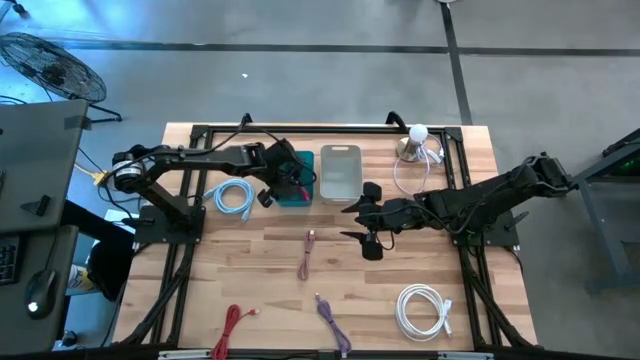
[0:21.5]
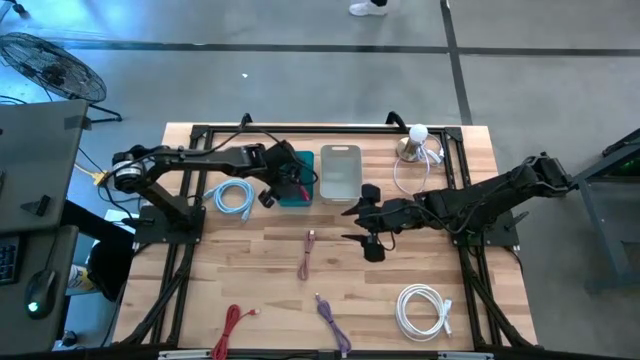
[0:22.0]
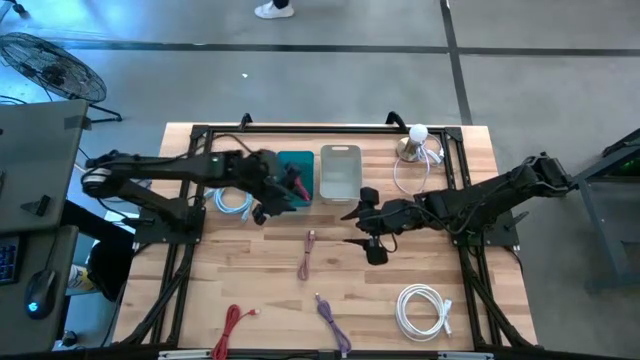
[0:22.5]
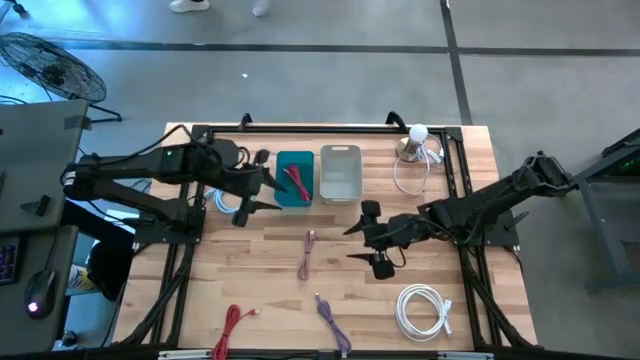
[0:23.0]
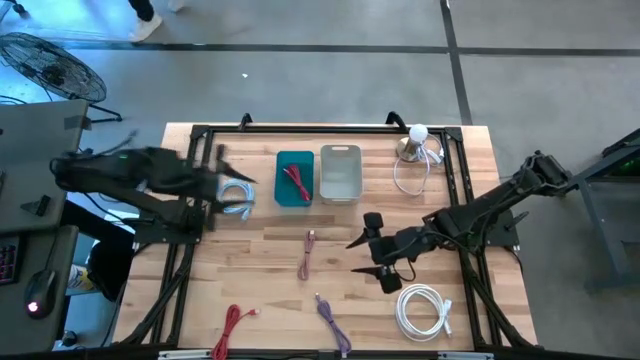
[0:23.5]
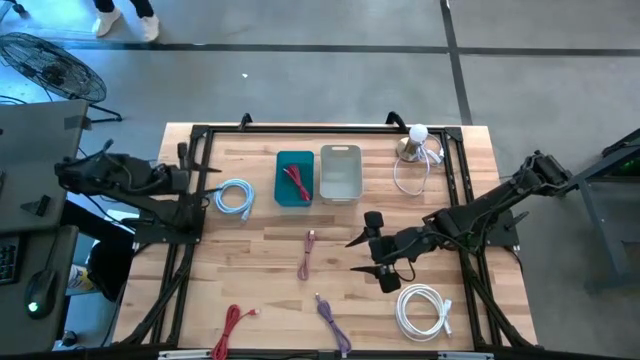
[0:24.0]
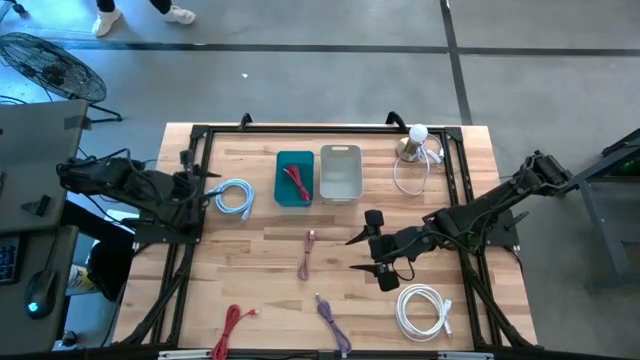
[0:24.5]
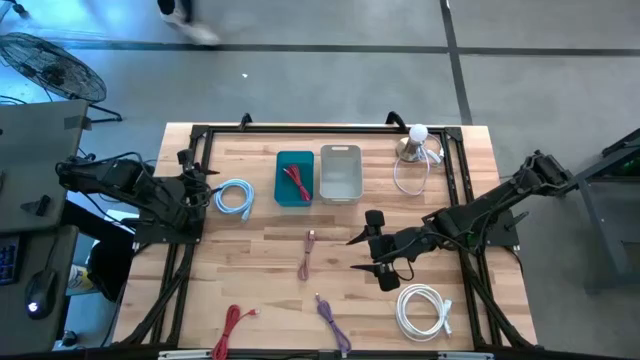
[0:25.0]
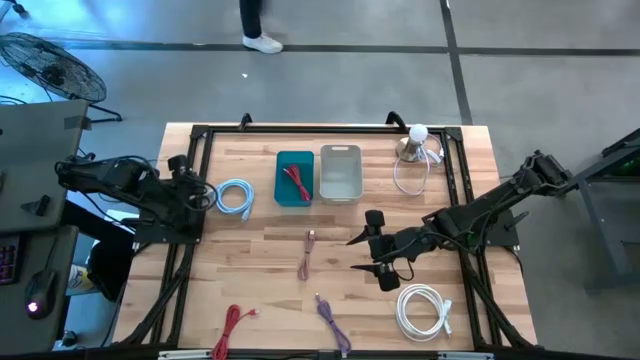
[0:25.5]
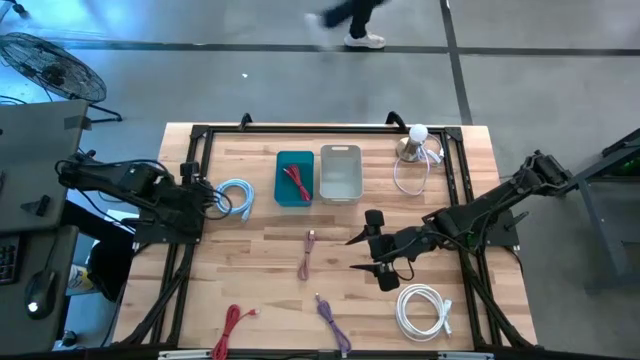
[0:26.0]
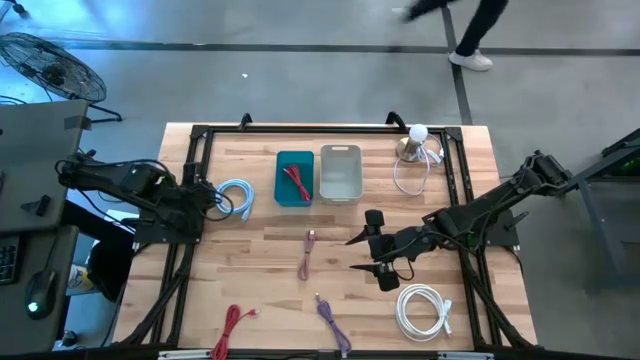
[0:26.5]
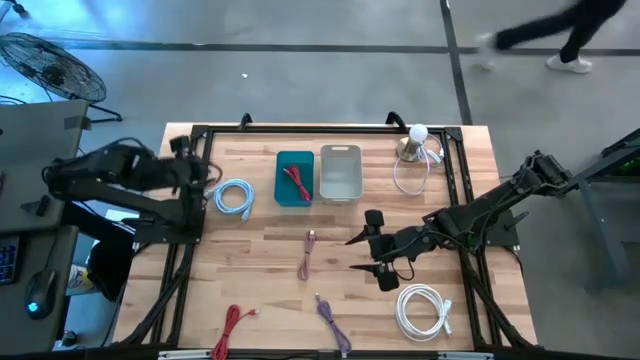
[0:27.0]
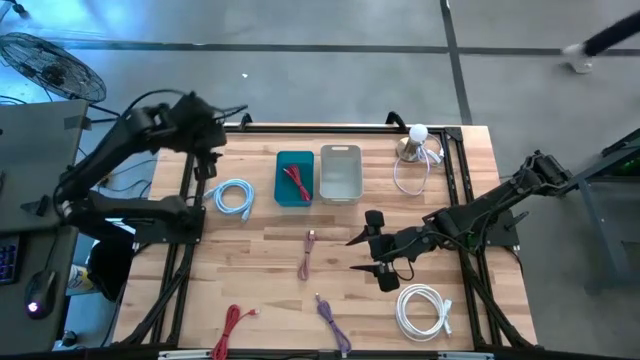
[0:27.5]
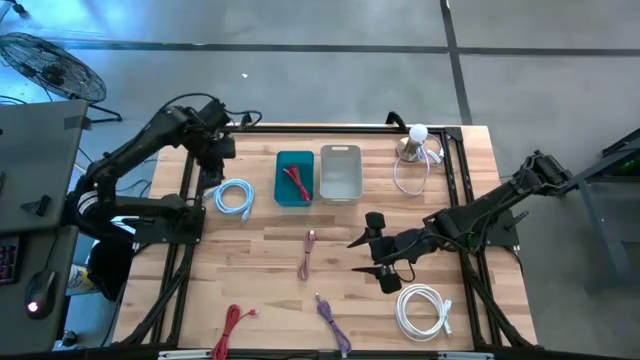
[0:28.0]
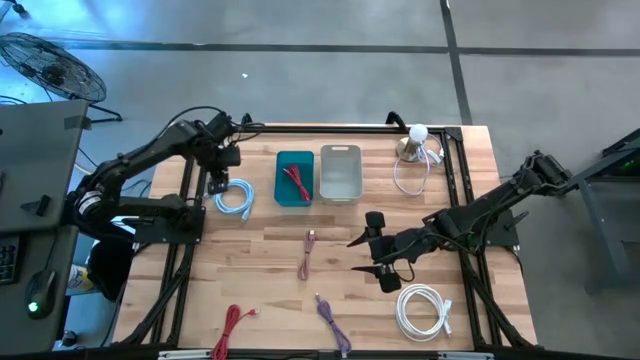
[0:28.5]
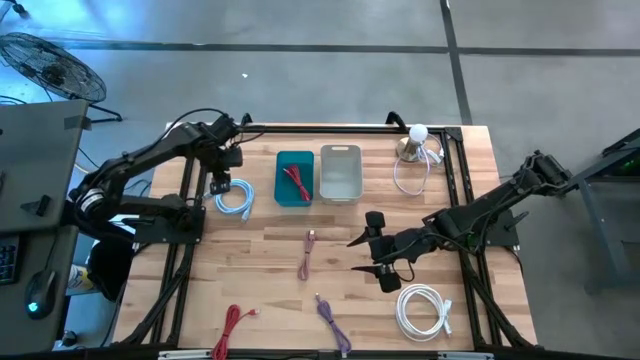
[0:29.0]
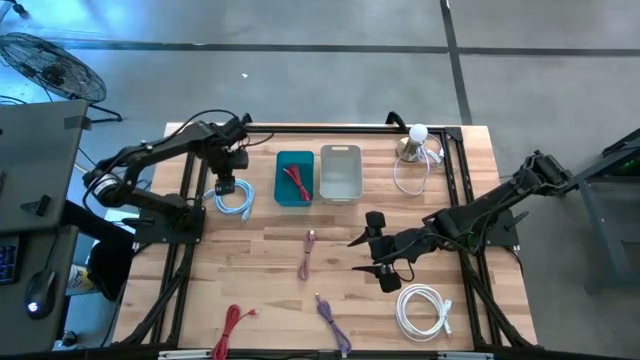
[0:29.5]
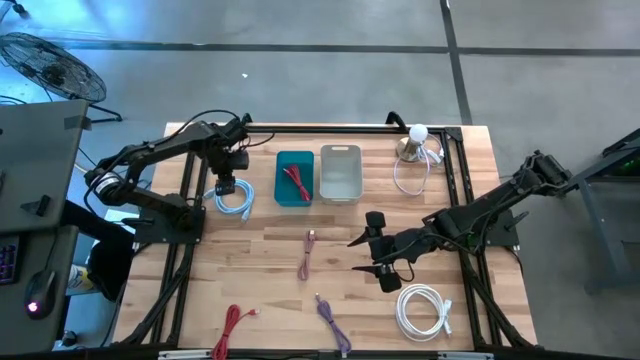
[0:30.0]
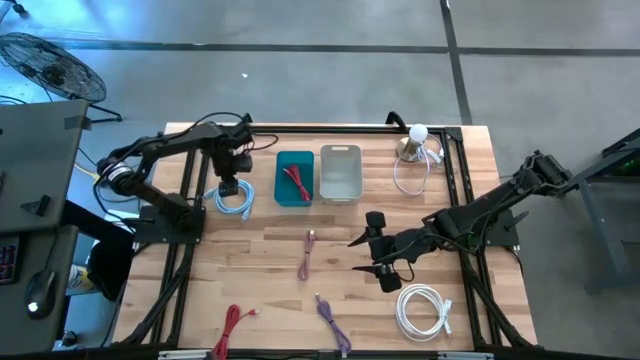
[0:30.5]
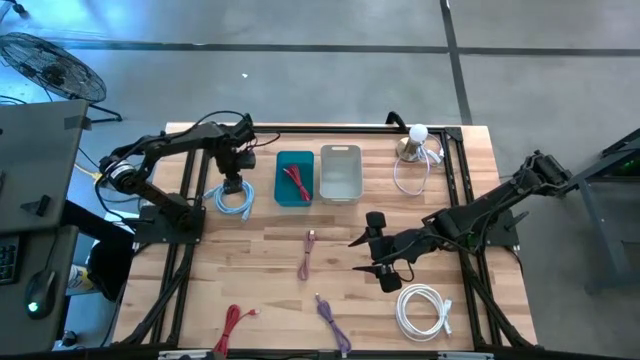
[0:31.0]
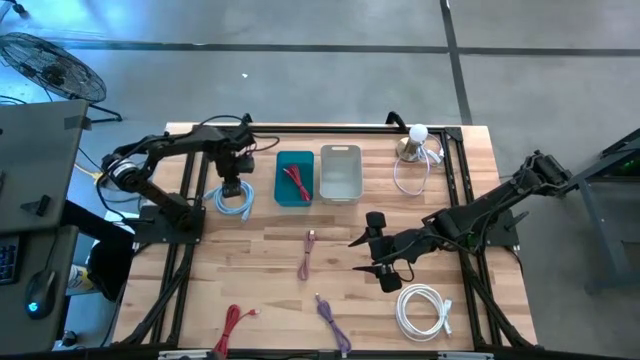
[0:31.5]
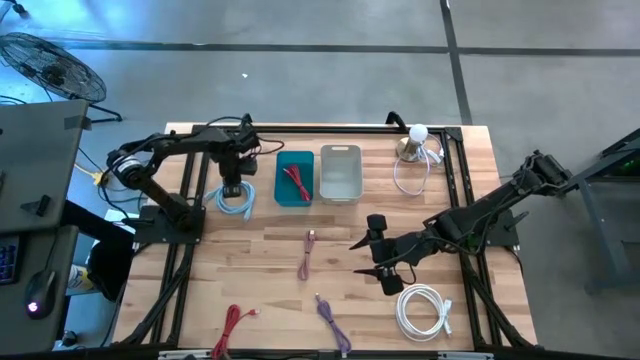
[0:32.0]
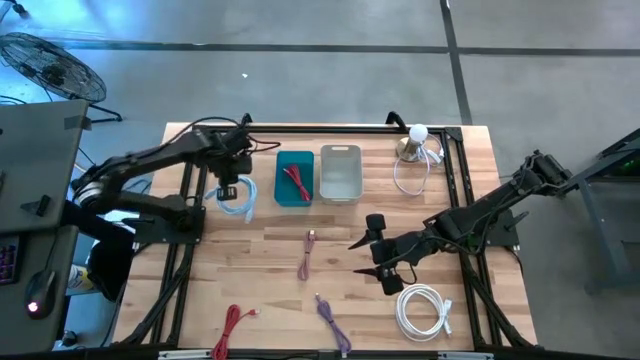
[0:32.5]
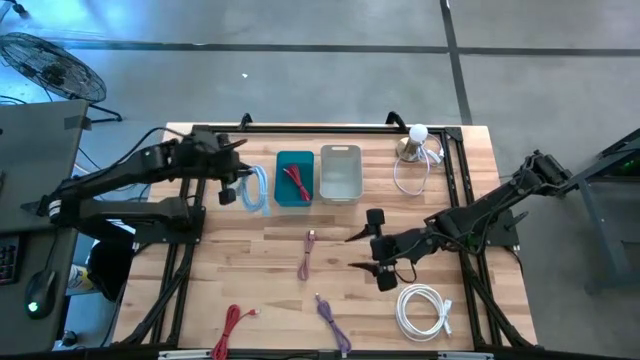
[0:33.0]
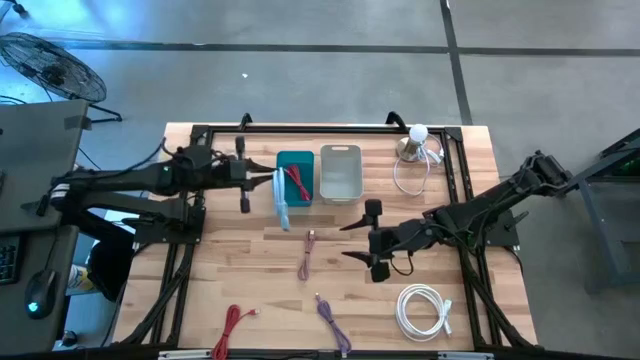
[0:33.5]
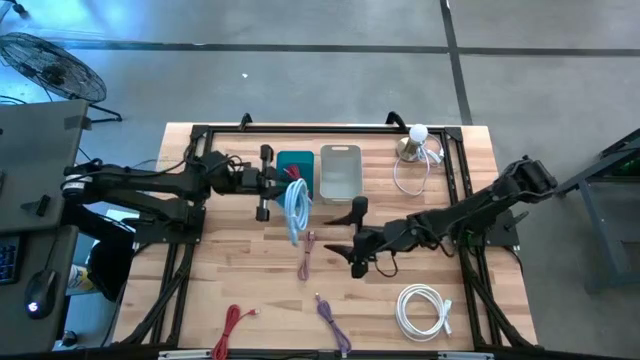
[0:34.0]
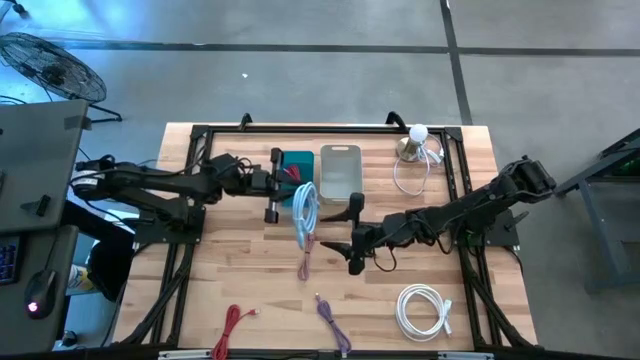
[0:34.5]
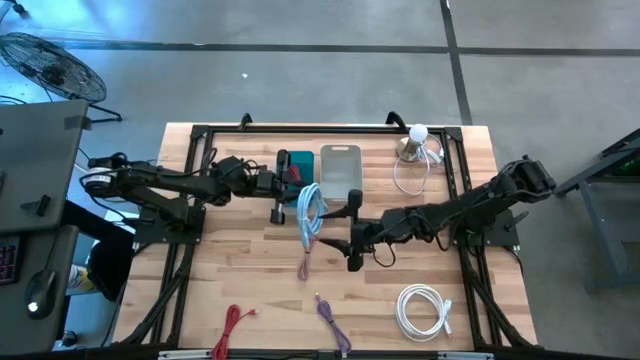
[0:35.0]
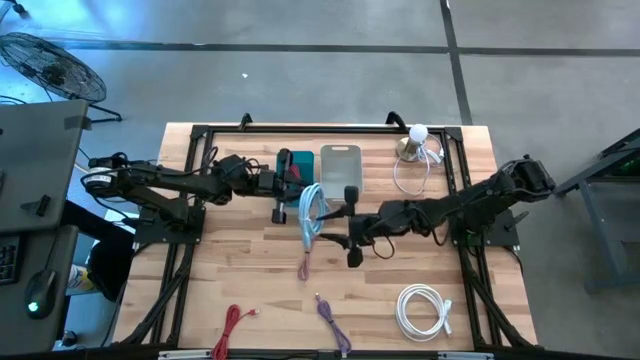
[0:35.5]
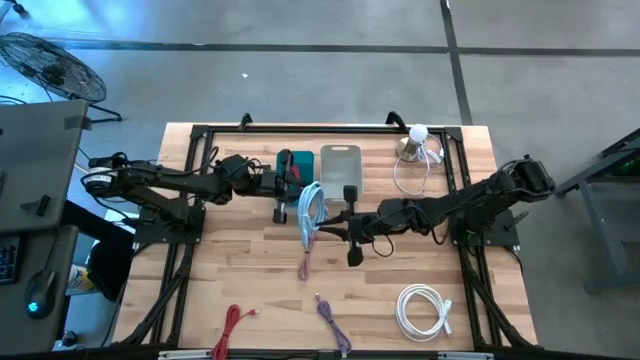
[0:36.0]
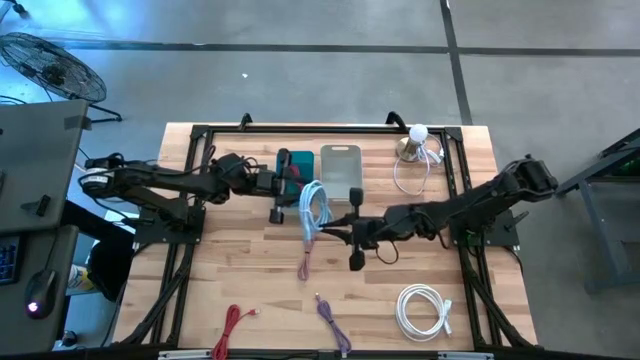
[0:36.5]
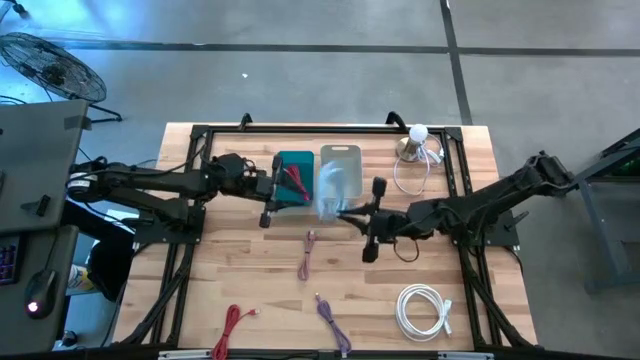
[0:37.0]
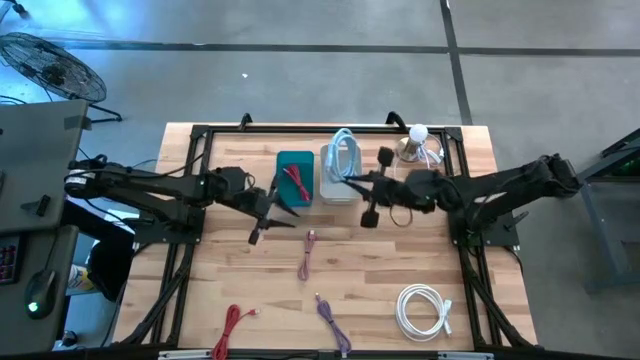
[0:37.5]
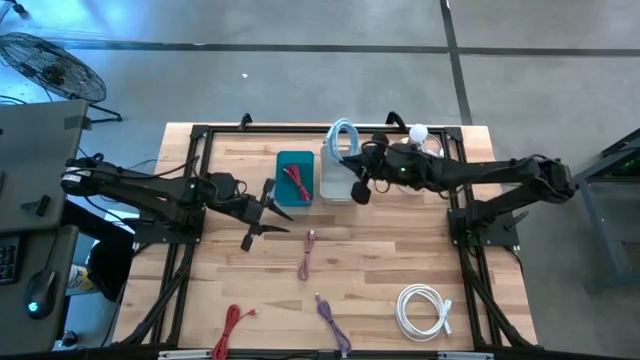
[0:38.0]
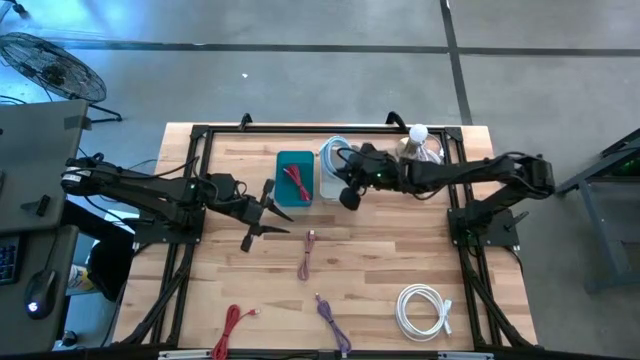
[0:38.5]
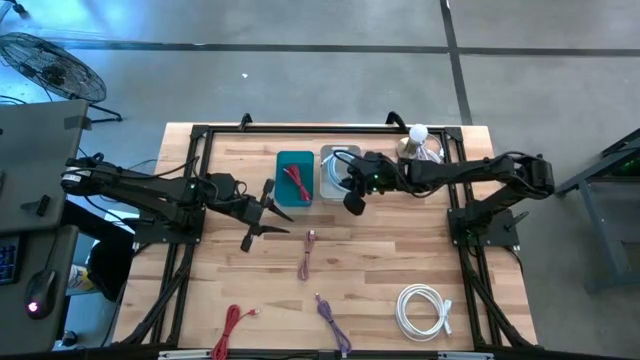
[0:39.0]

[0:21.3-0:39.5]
Task: Pick & Place USB Port
Put the blue HDMI into the white bin
